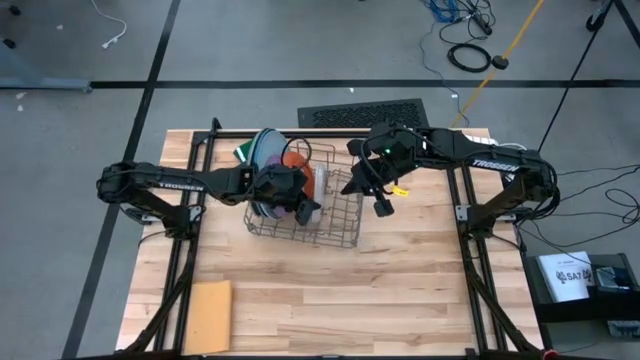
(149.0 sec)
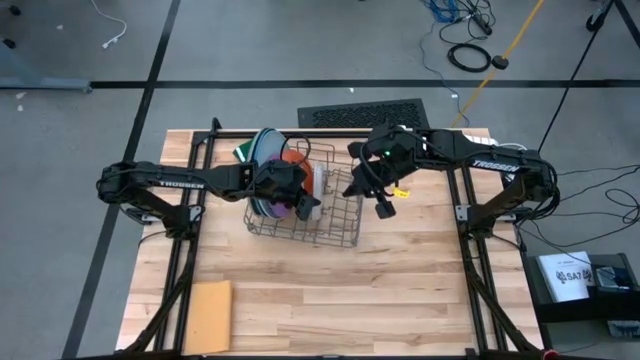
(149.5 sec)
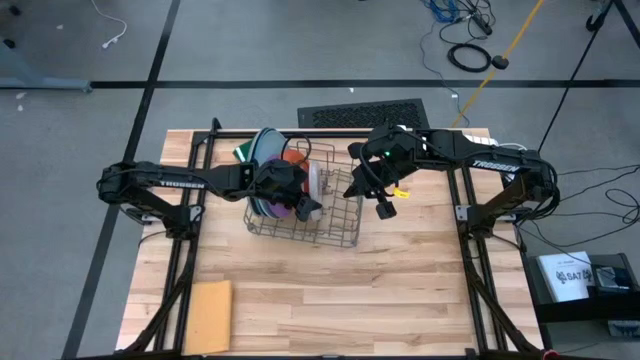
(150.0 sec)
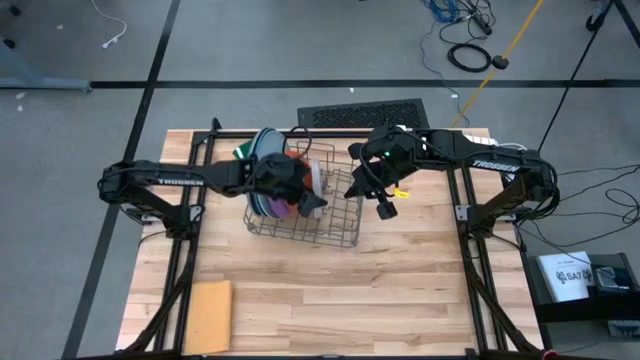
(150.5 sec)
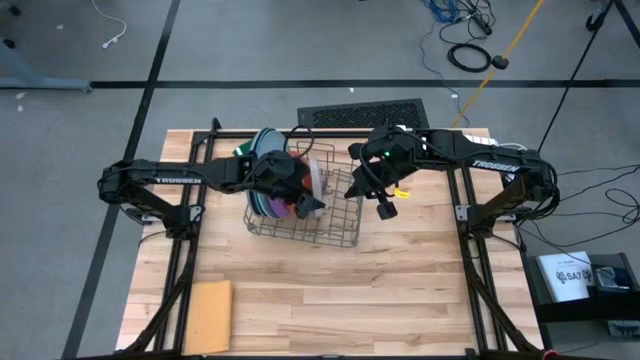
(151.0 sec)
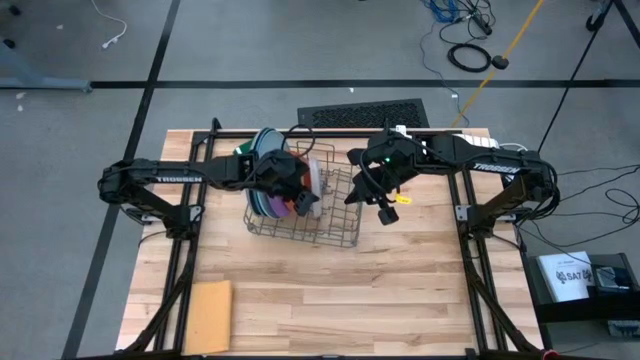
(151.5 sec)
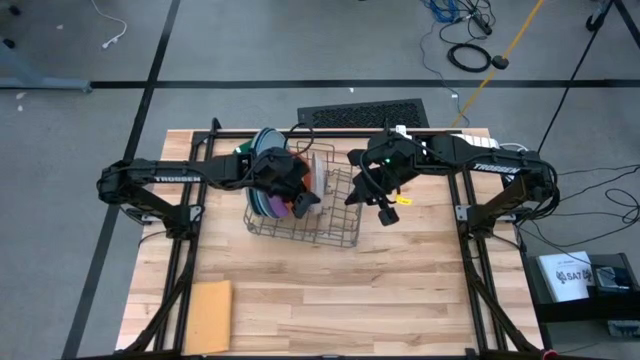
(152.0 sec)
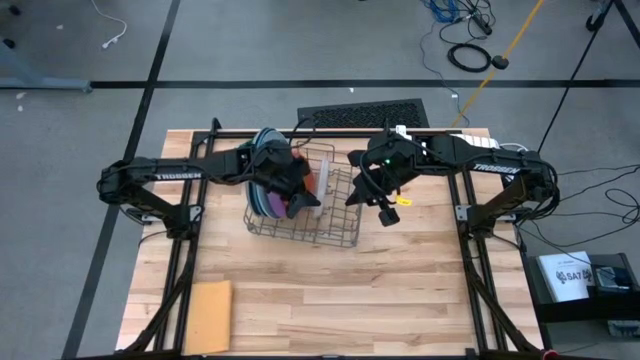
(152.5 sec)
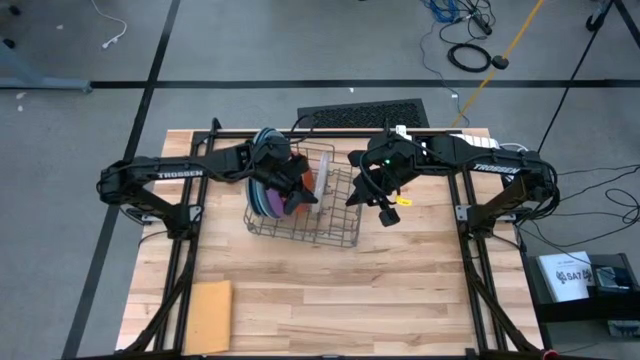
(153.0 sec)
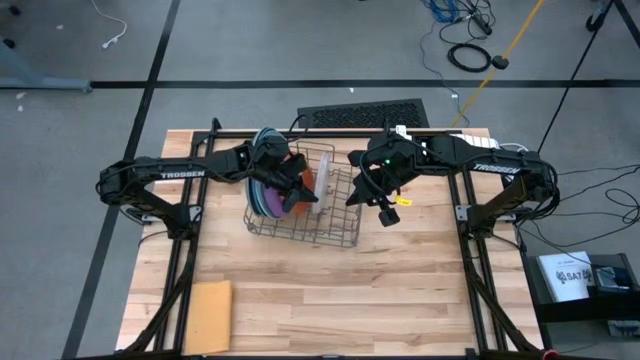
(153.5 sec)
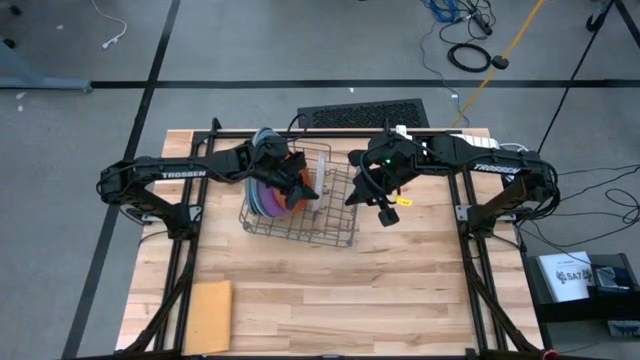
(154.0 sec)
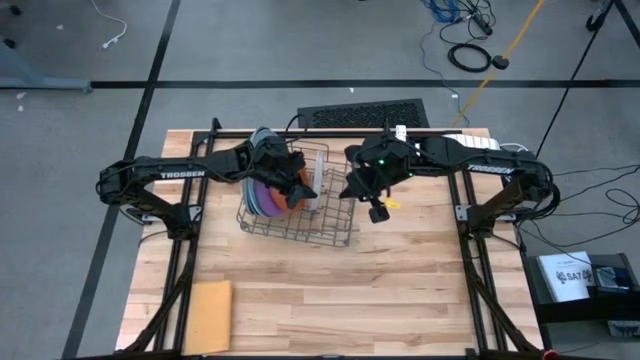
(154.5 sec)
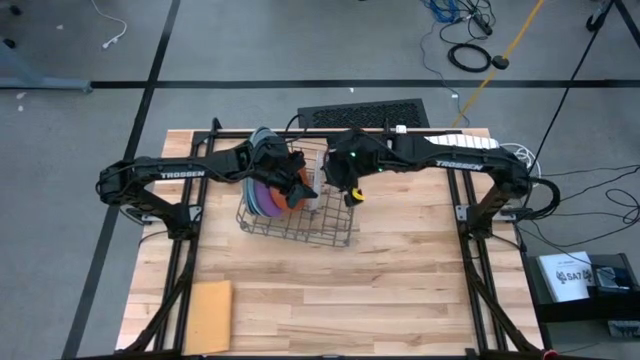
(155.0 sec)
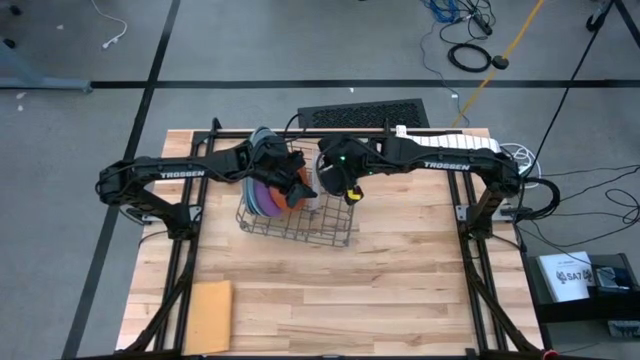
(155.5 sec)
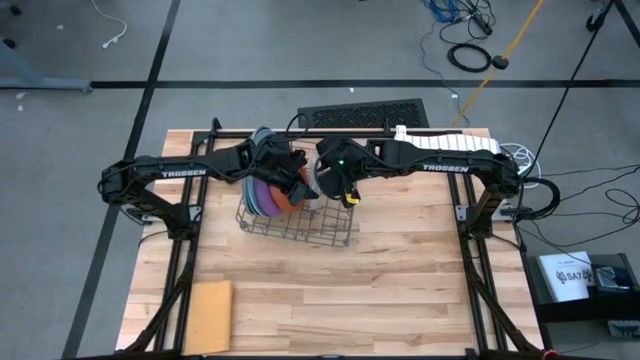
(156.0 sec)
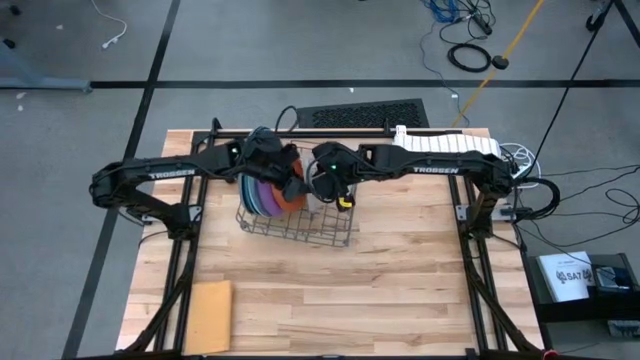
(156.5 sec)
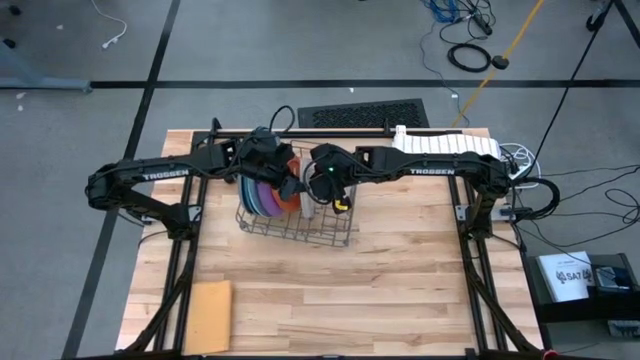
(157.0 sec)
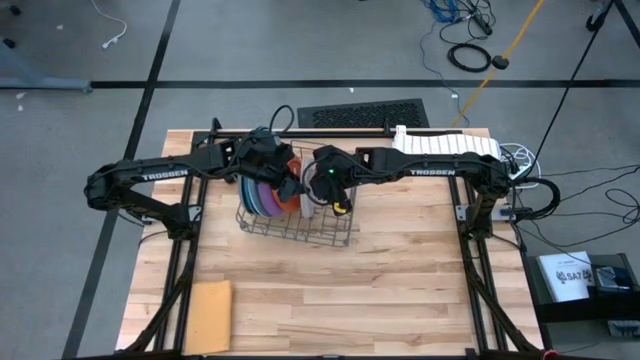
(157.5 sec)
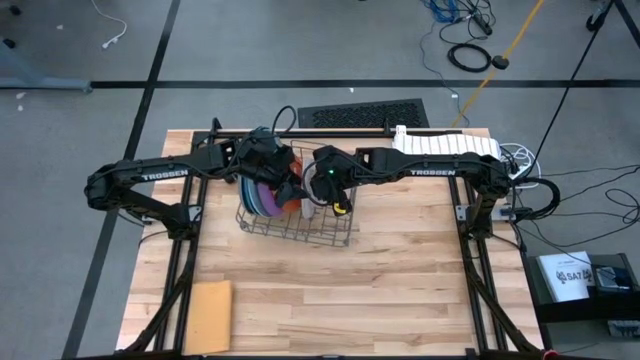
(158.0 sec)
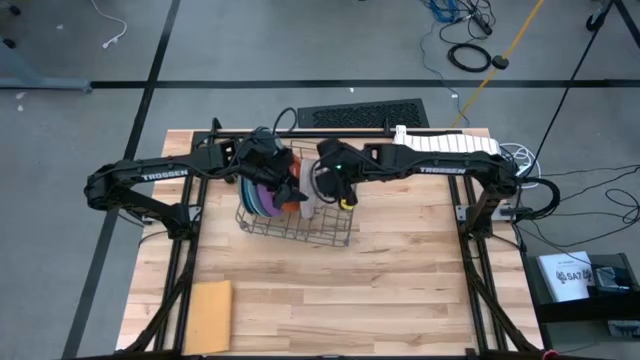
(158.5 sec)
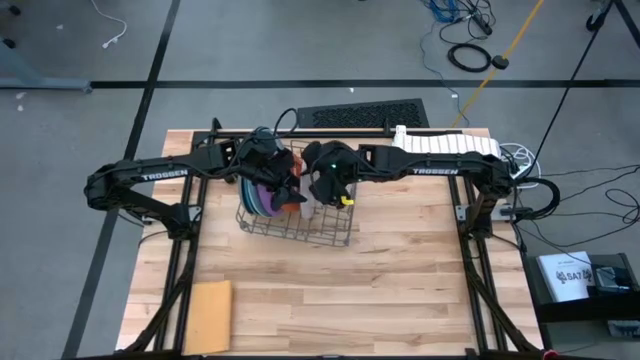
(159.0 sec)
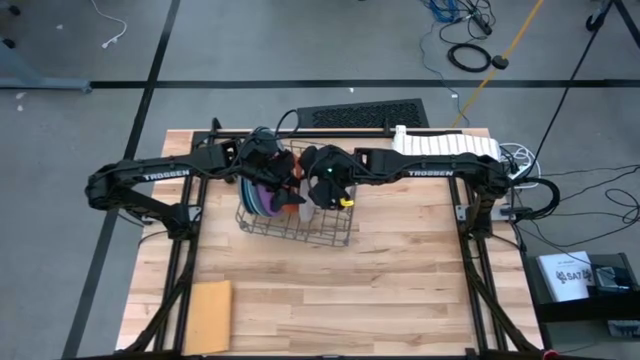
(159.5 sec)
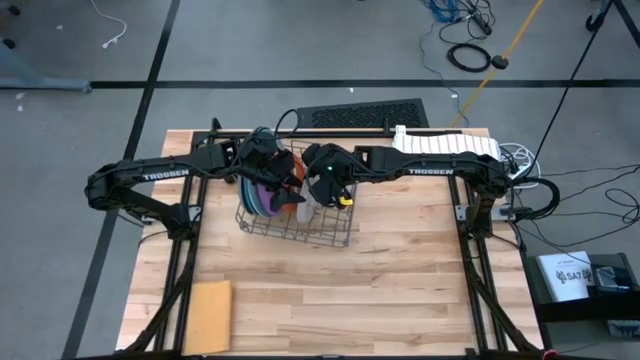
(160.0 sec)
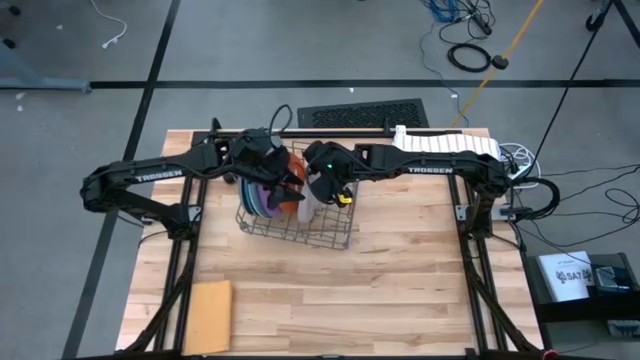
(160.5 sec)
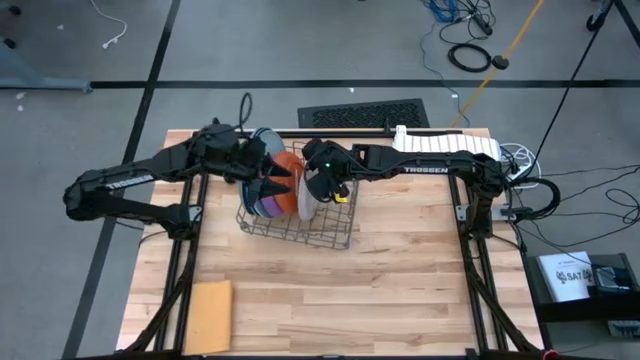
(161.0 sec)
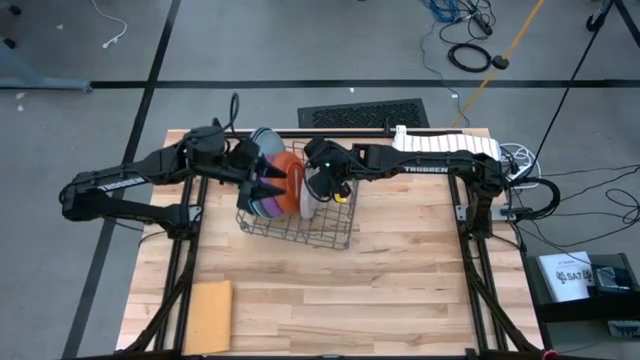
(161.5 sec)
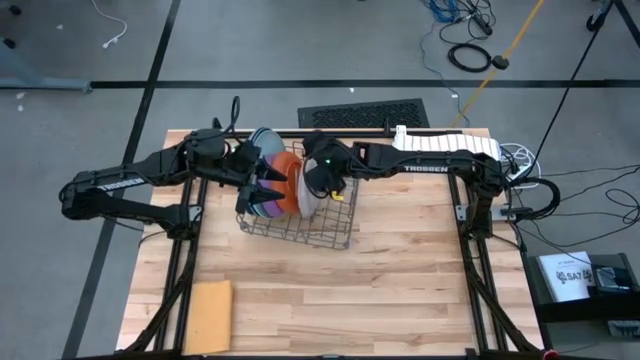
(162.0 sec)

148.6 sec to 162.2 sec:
Task: Sort dishes
Put the white plate into the green dish rack

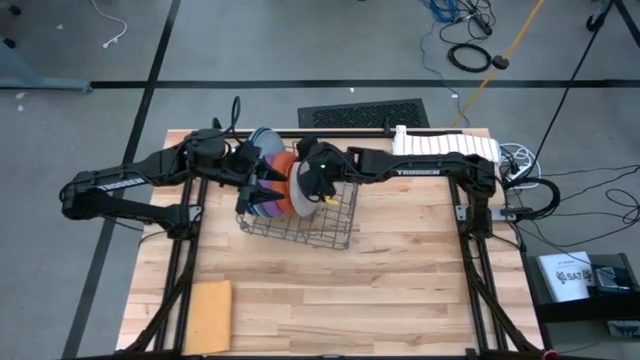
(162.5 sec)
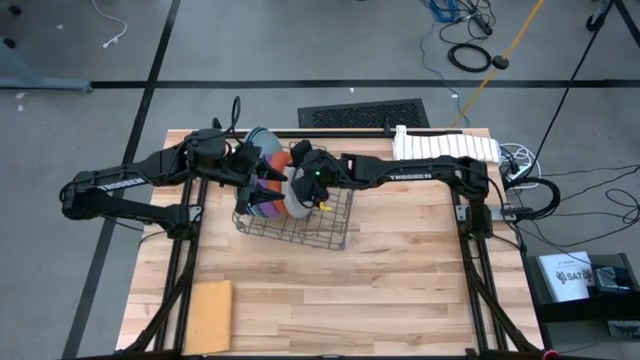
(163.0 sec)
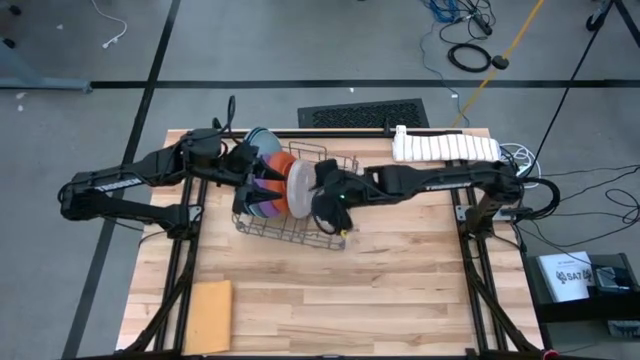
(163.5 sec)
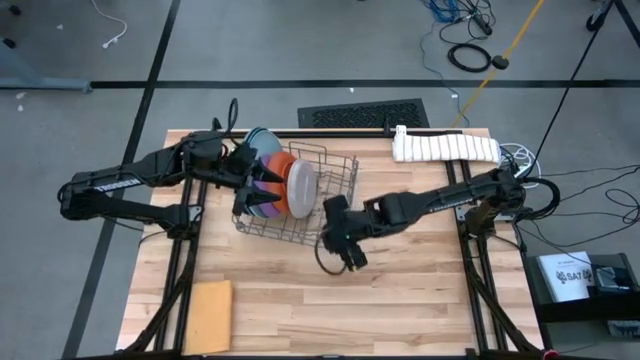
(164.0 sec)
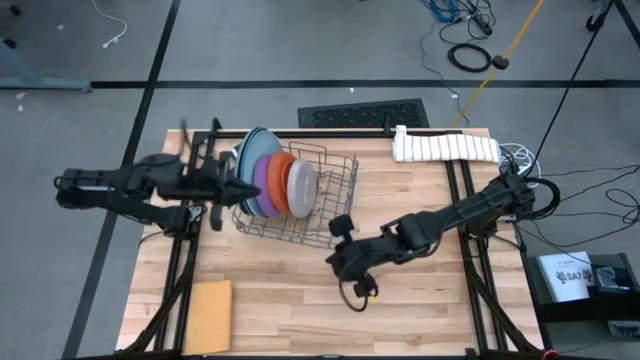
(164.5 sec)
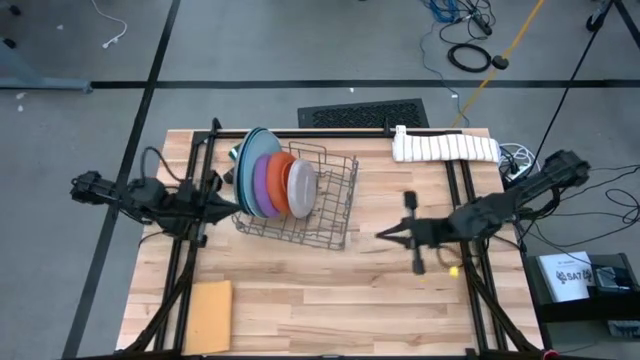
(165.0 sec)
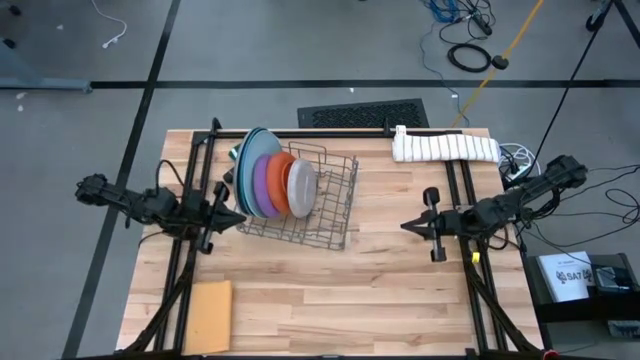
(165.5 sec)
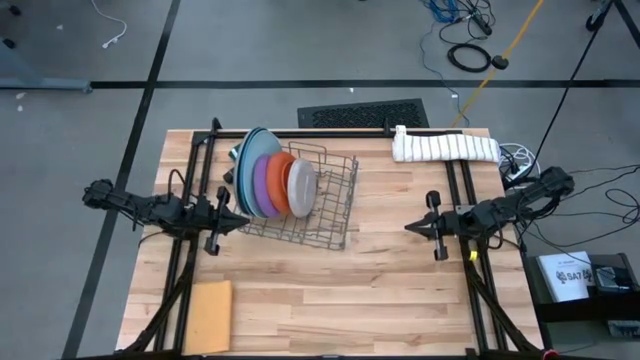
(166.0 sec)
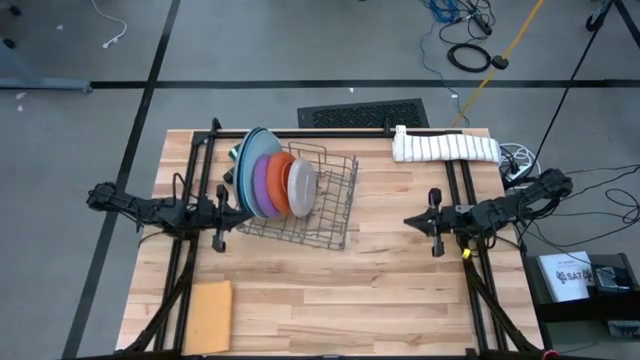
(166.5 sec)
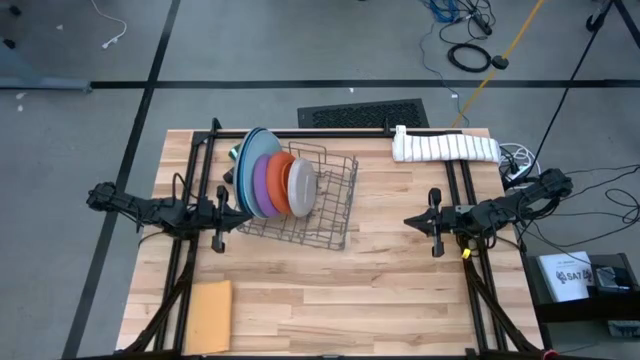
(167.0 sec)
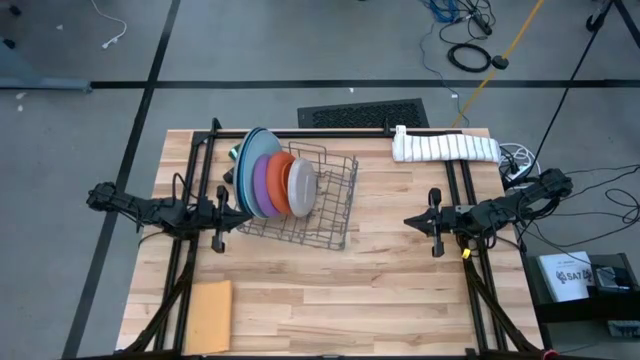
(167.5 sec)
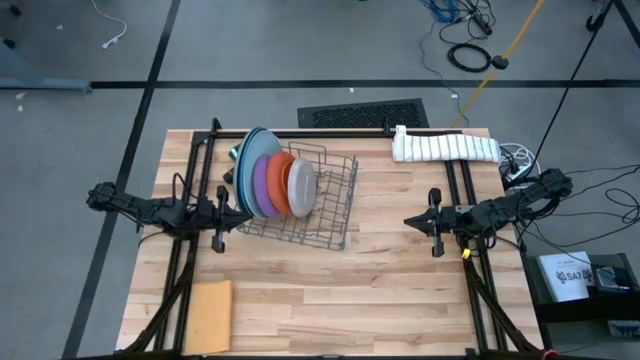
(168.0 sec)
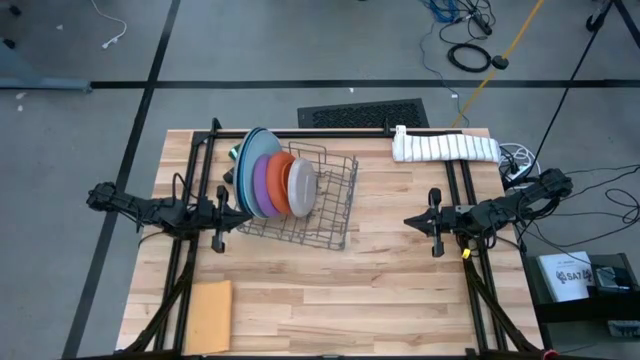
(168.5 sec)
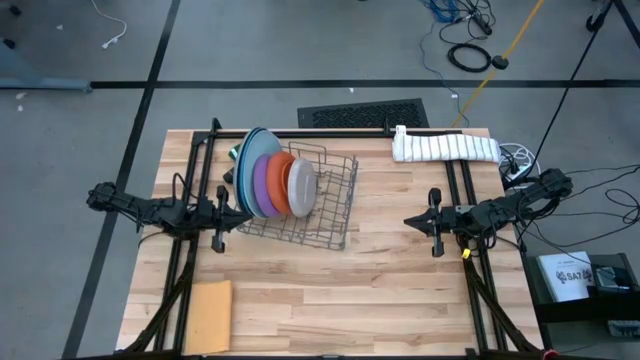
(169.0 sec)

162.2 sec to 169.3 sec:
Return to Home Position
